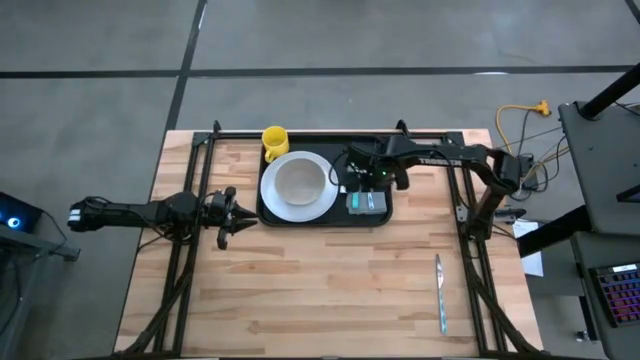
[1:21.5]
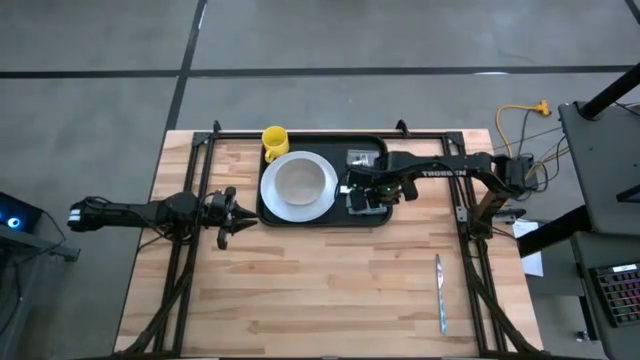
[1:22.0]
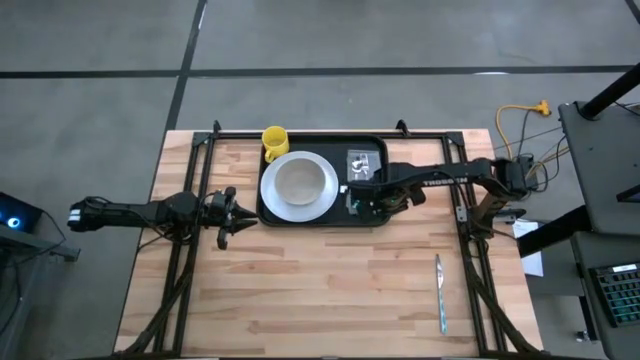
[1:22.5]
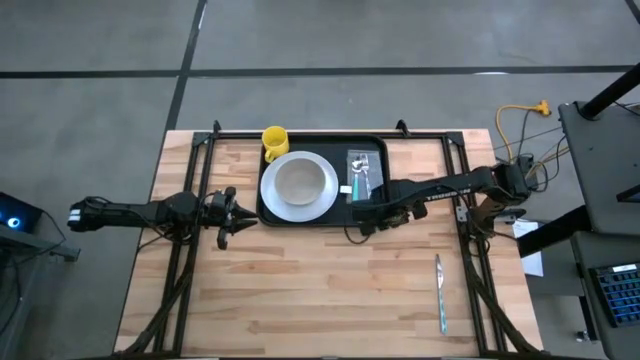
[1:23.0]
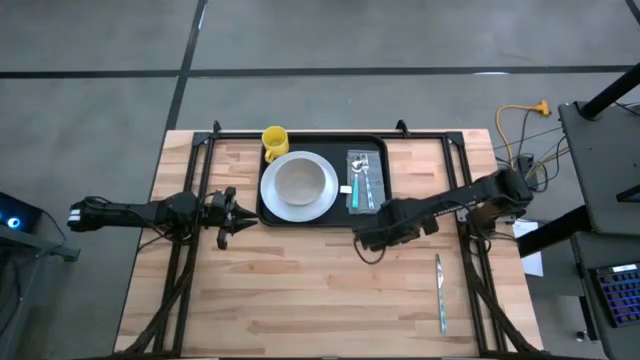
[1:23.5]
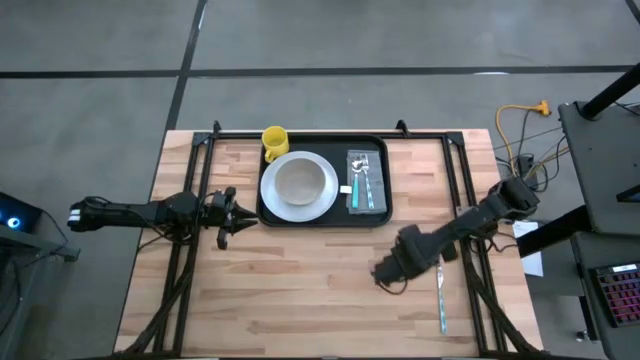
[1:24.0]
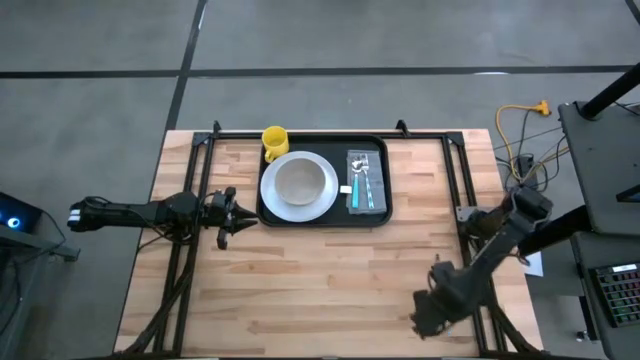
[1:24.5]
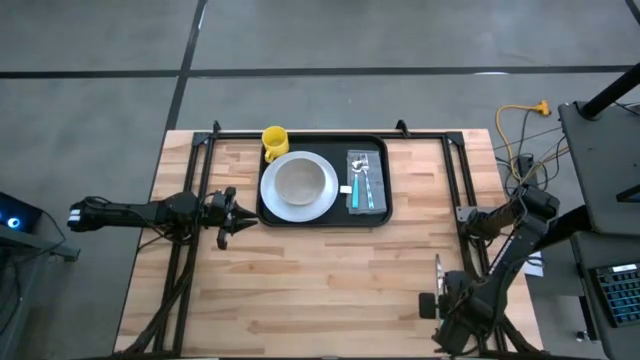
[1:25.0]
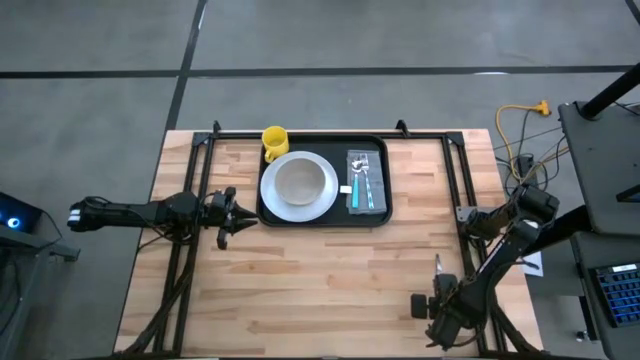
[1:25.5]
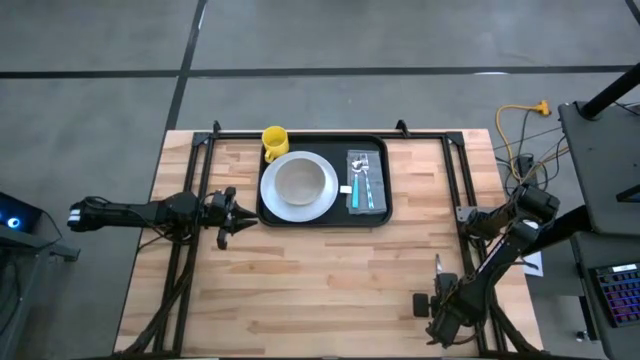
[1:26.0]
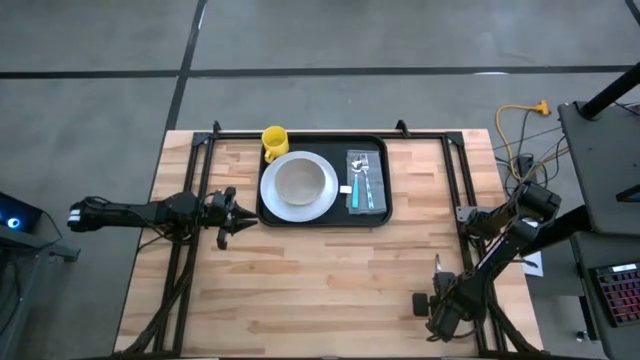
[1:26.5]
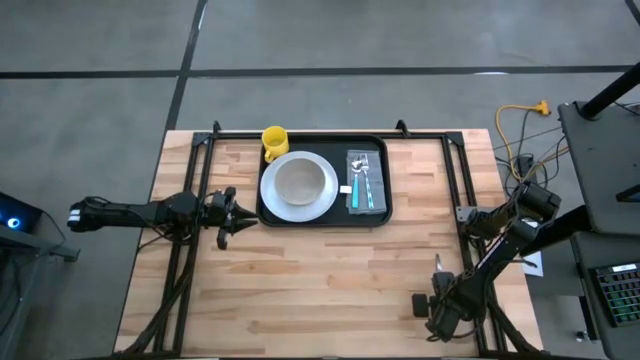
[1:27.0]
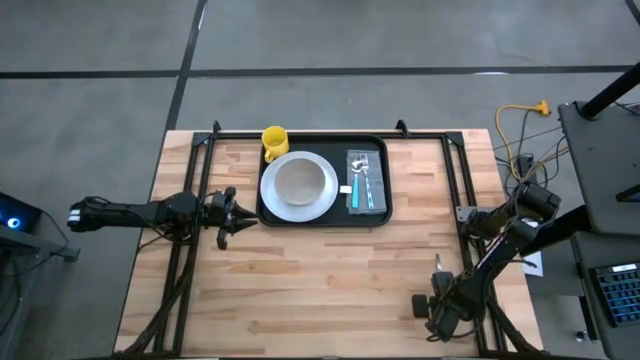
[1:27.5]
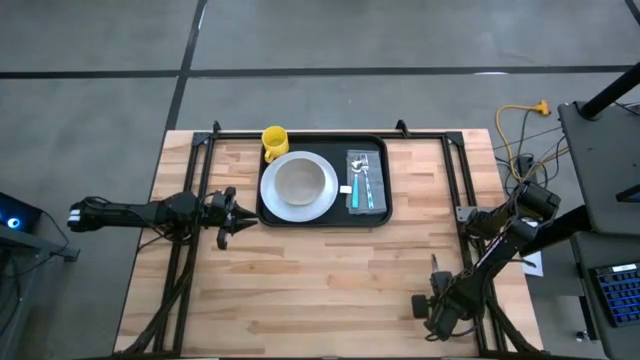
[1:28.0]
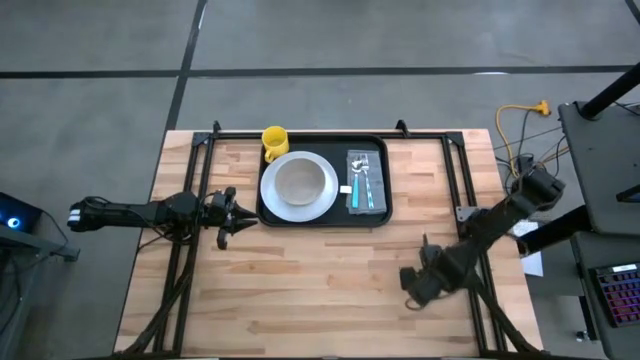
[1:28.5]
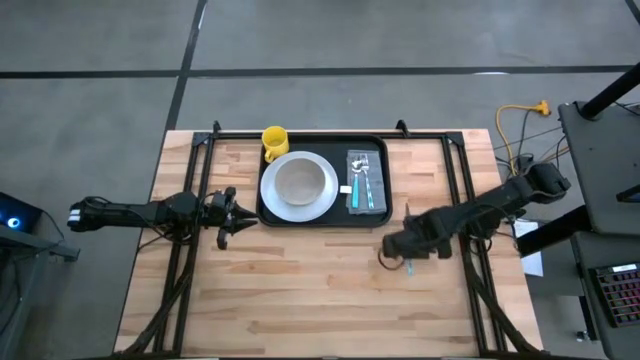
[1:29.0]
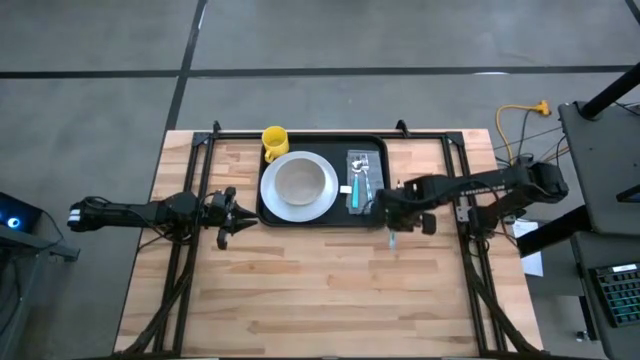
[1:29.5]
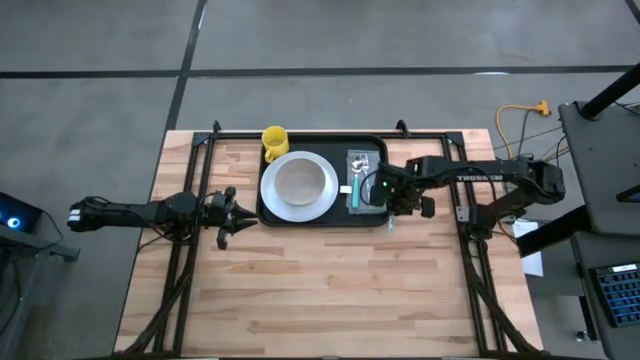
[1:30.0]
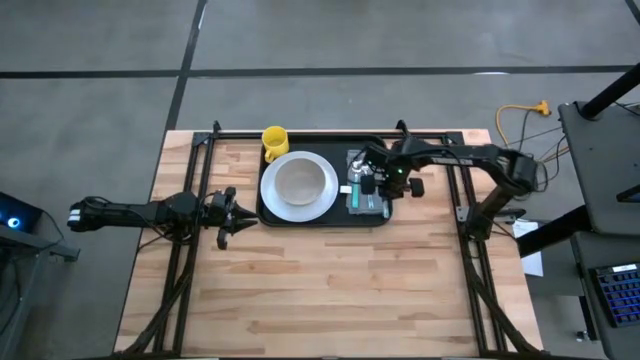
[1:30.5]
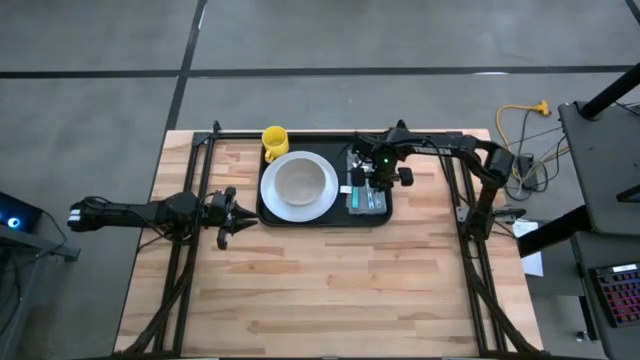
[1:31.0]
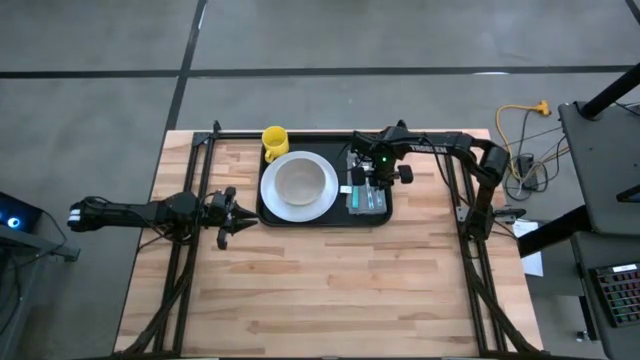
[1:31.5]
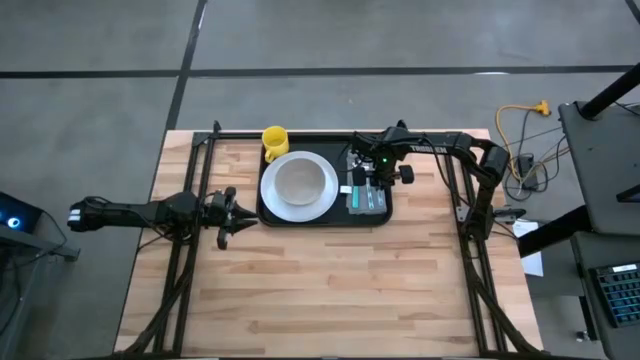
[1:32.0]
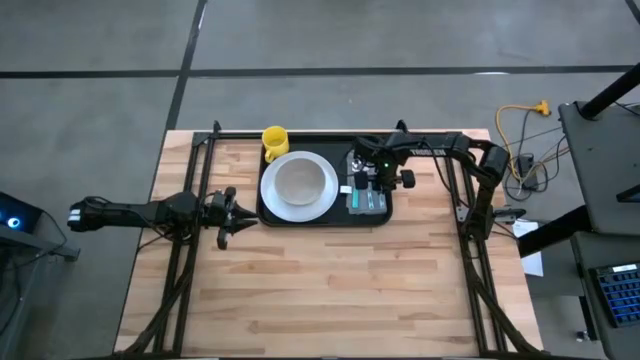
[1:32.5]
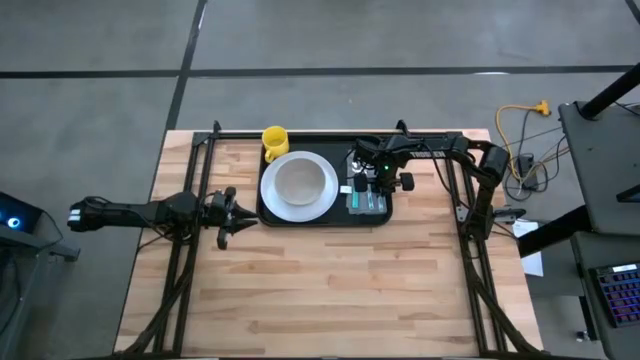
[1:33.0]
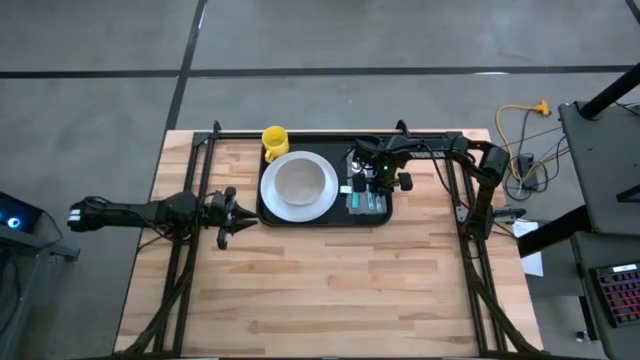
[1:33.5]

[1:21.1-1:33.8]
Task: Set up tray
Put the white patterned knife on top of the gray napkin to the right of the blue fork on the black serving tray

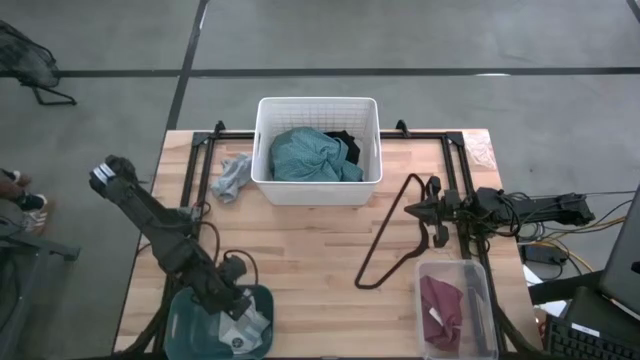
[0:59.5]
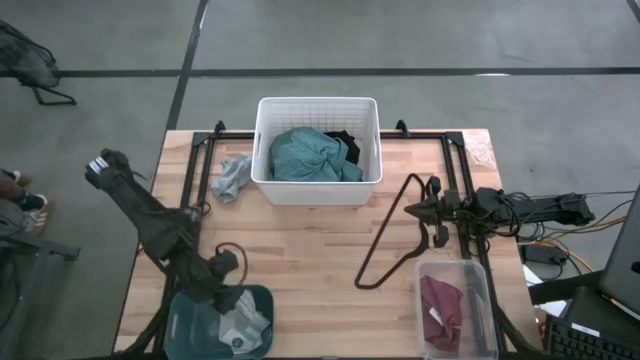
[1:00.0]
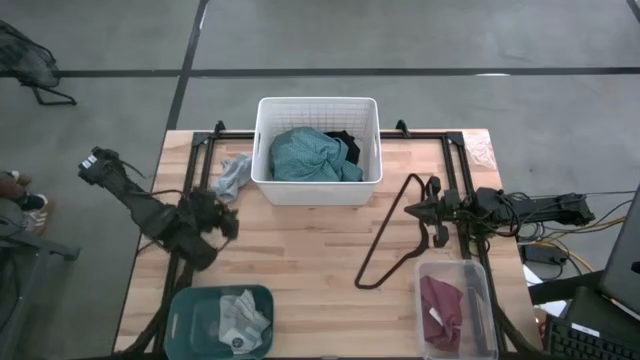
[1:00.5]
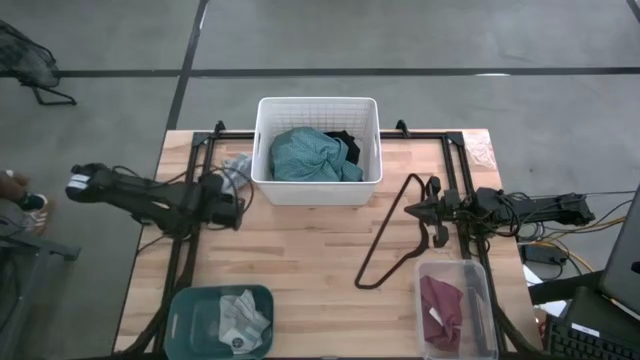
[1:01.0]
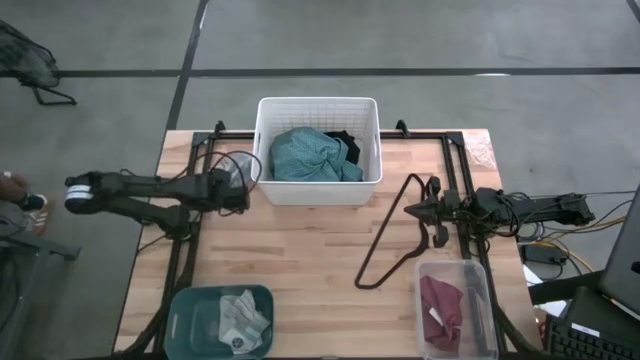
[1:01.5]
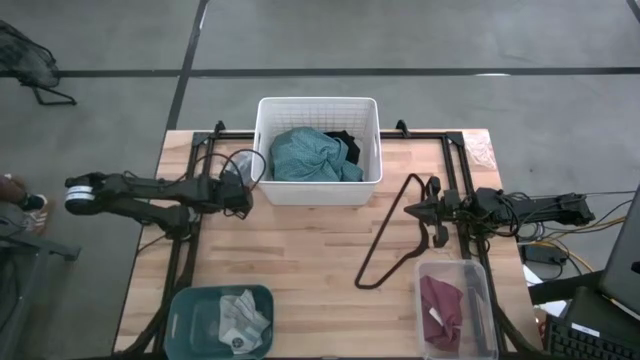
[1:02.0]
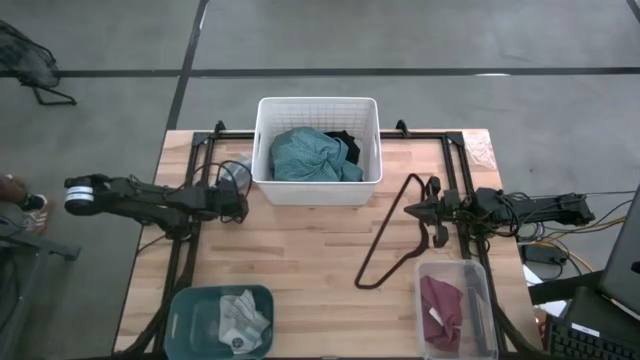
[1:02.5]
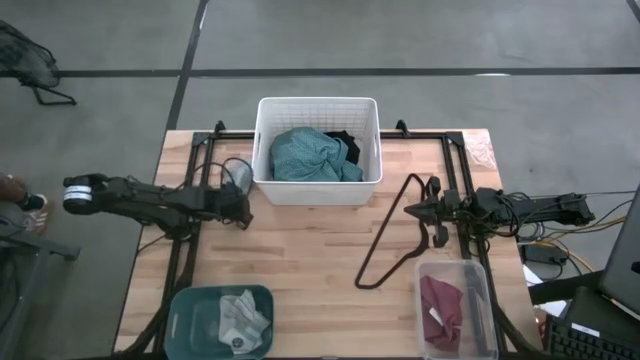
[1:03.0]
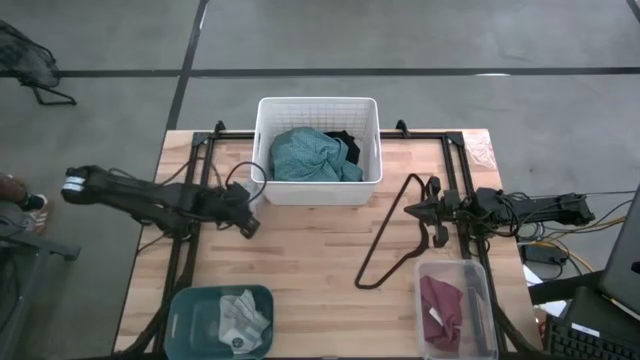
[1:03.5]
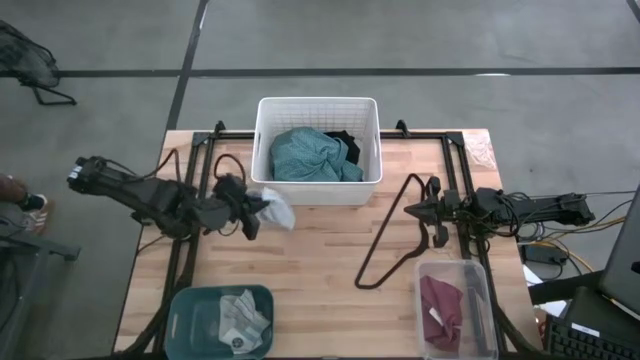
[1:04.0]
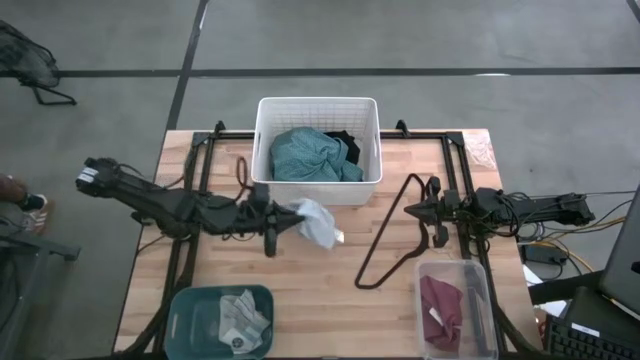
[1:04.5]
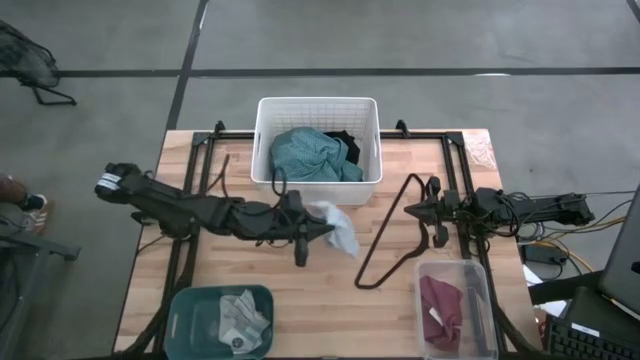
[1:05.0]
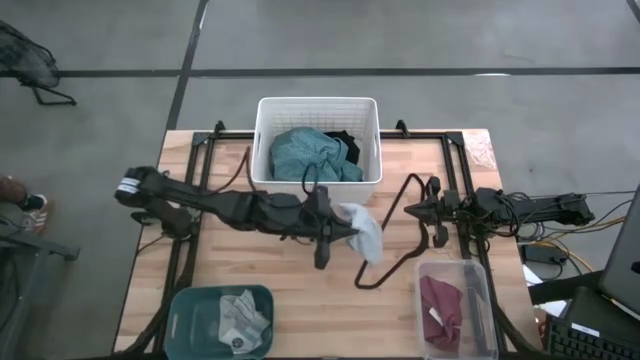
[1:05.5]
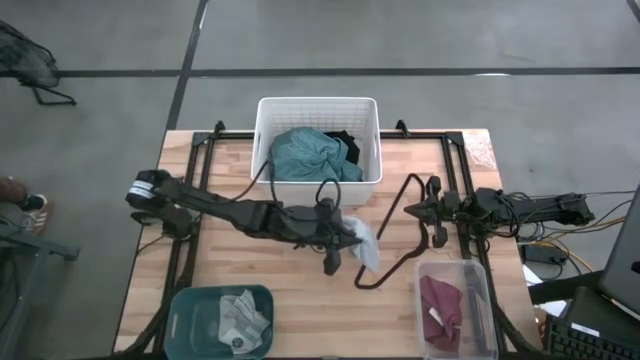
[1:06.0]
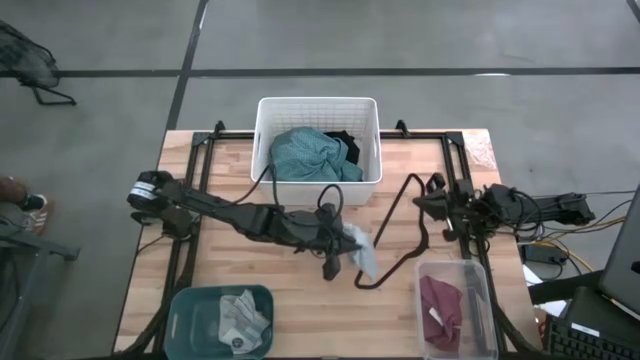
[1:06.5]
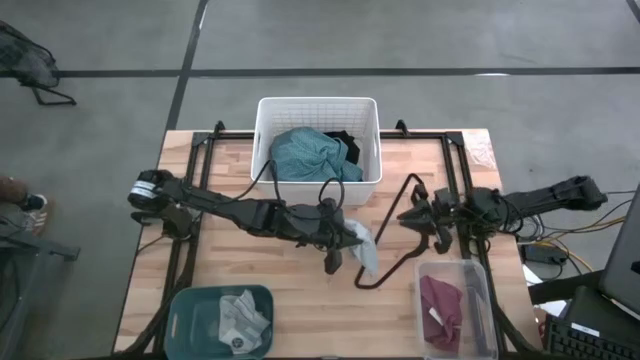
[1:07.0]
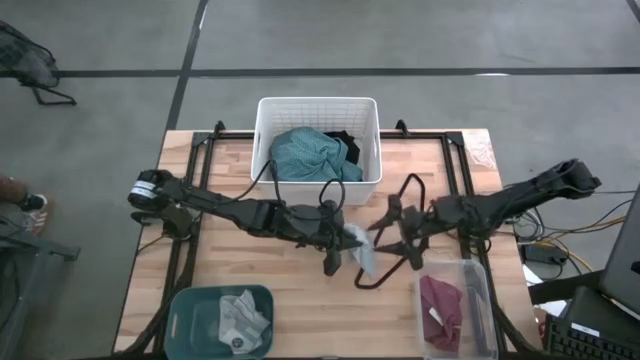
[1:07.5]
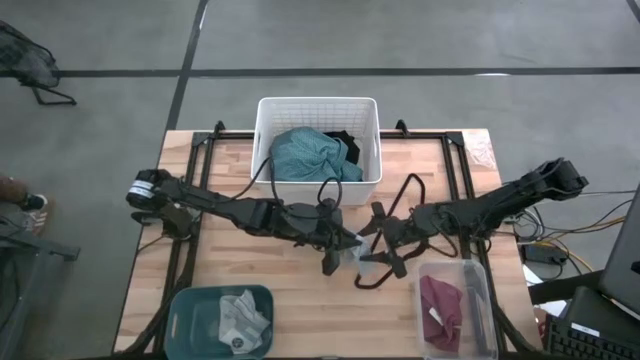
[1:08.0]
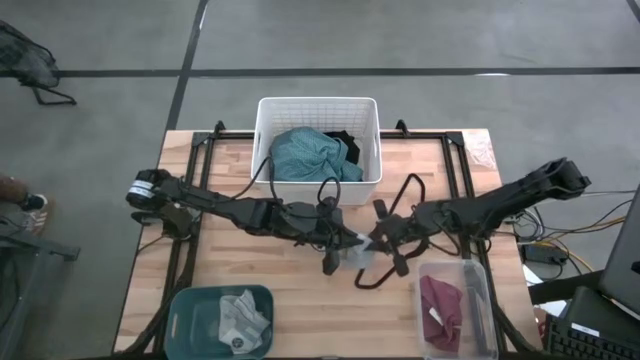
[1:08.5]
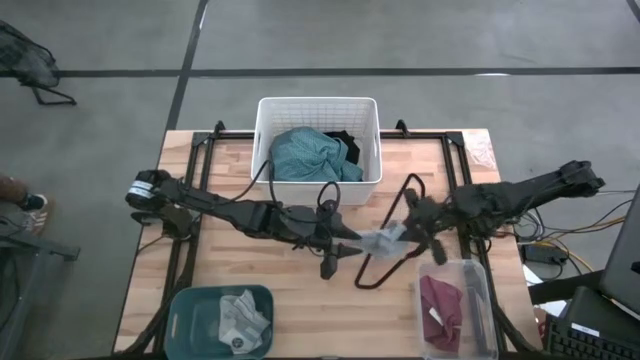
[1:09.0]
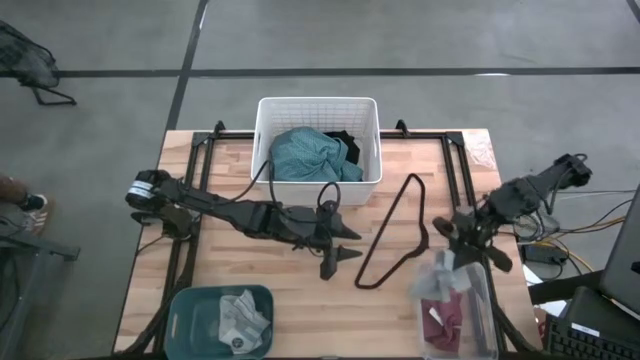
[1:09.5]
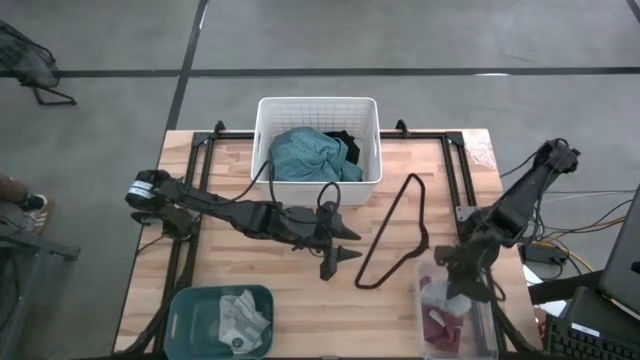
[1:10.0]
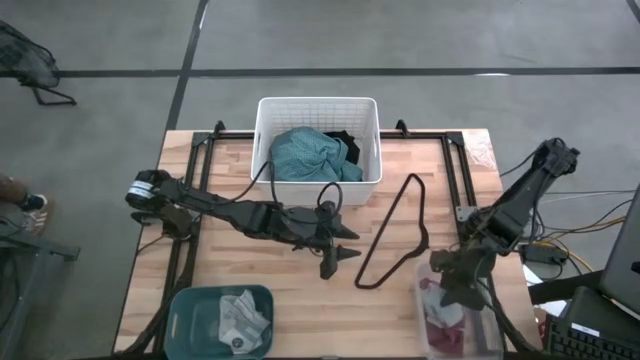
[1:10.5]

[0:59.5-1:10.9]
Task: Pick & Place Cloths
Put the gray underwear into the transparent bin
